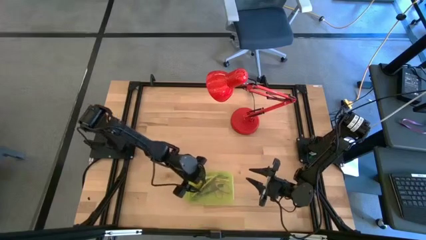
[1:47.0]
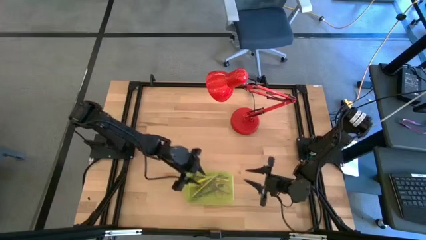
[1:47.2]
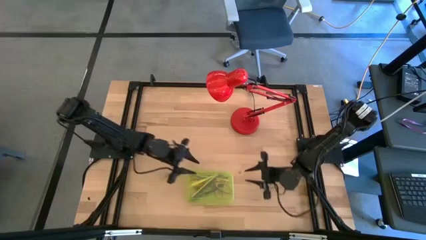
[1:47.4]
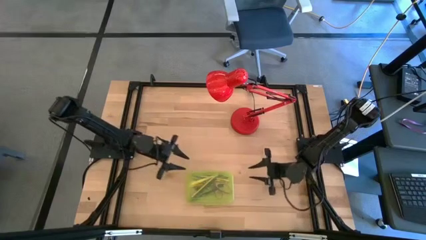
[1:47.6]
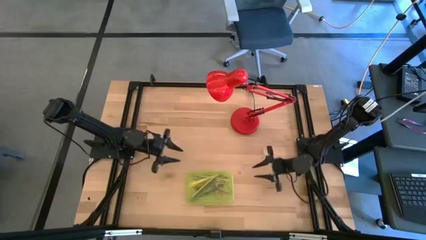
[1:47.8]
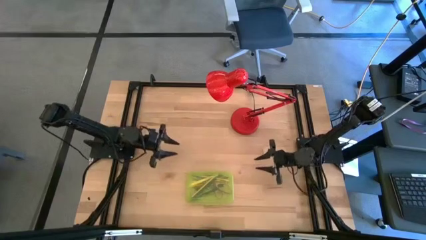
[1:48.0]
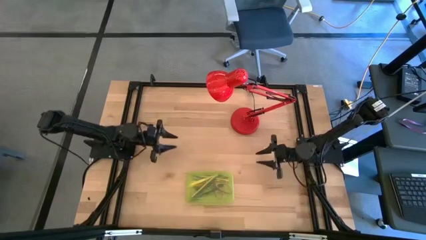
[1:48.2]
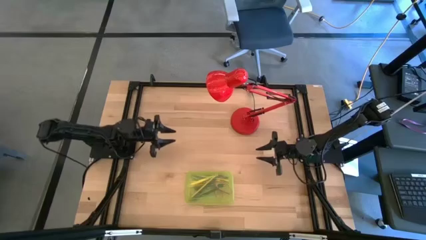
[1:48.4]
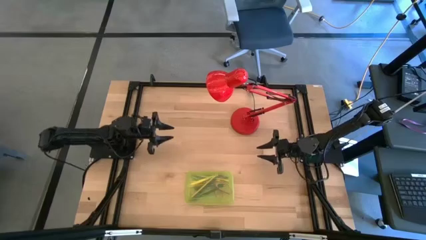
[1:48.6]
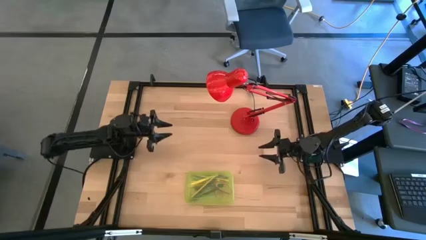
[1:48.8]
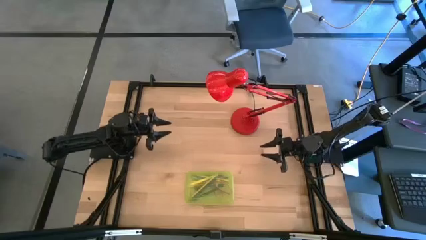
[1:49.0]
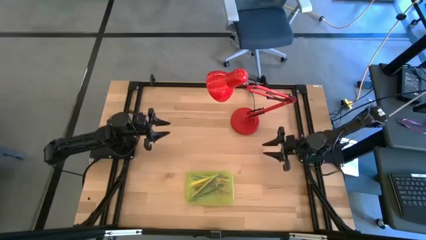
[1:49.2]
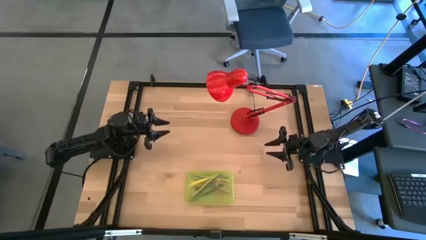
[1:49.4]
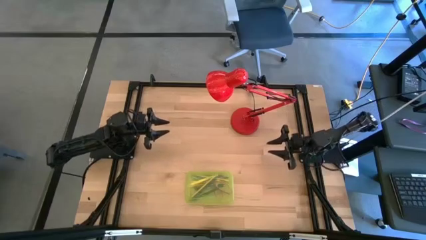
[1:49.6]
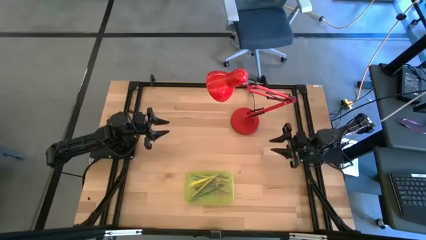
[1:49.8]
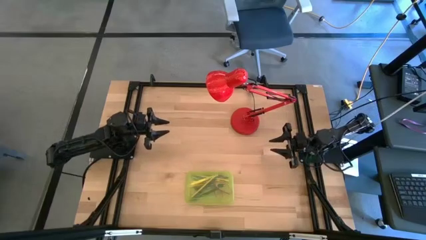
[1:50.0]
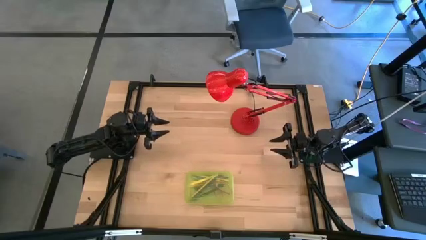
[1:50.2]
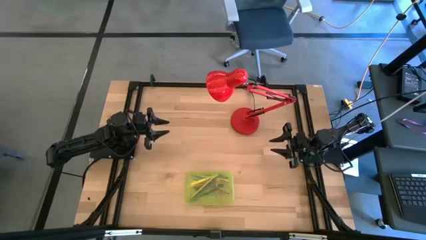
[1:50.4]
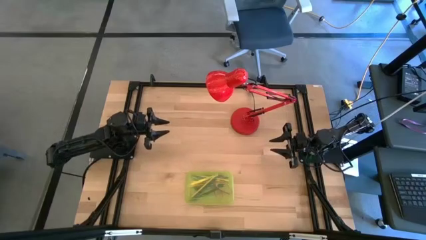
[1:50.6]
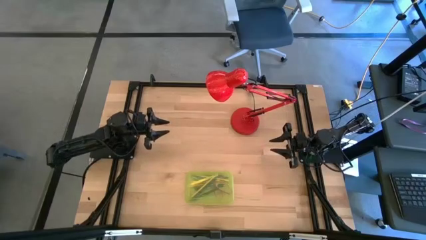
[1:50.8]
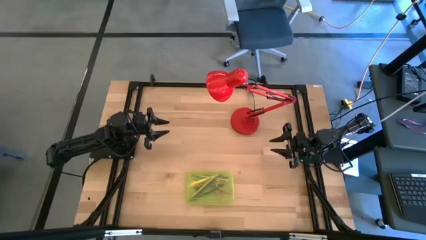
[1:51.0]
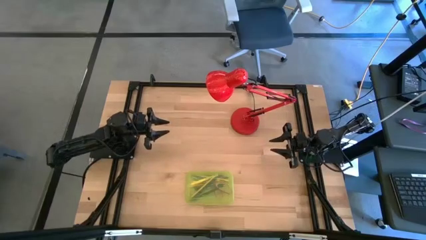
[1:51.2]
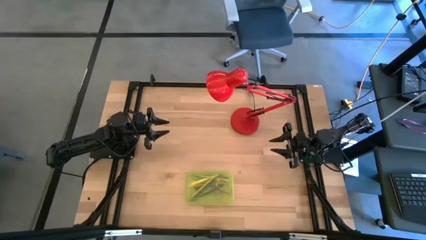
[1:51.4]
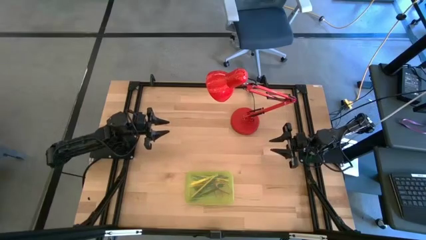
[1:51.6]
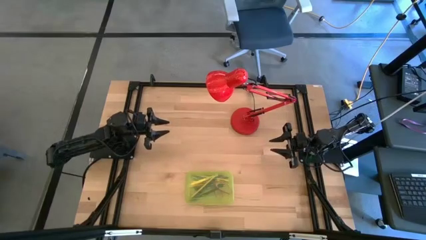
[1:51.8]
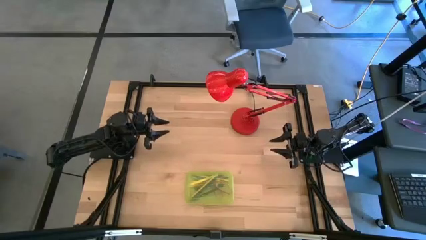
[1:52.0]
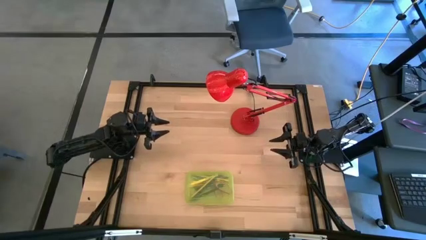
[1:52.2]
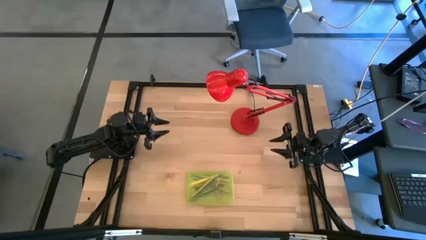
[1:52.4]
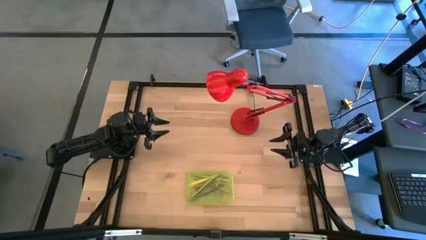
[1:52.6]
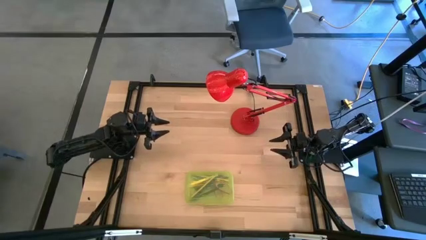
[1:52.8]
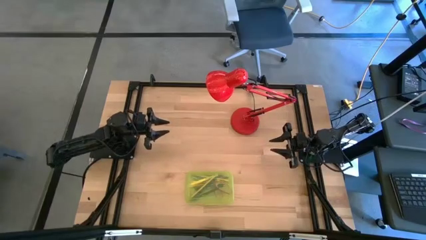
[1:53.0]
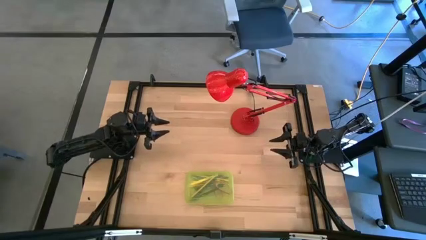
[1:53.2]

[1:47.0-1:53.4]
Task: Pick & place school supplies into a supply box
Return to Home Position

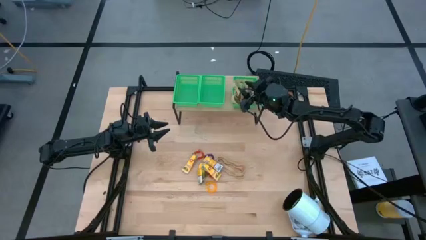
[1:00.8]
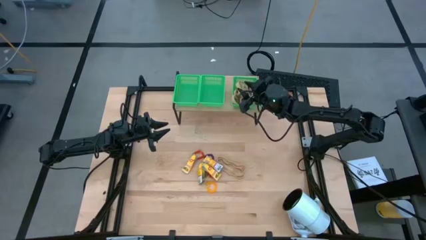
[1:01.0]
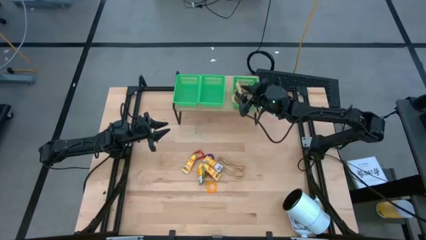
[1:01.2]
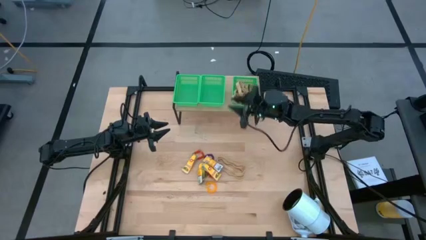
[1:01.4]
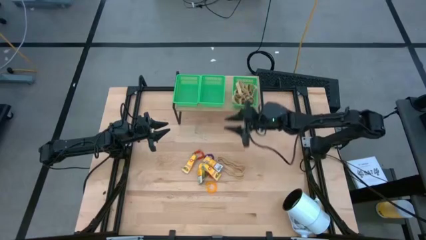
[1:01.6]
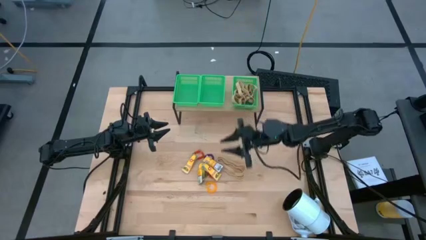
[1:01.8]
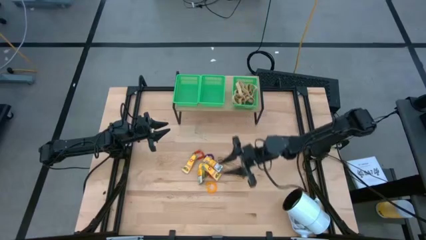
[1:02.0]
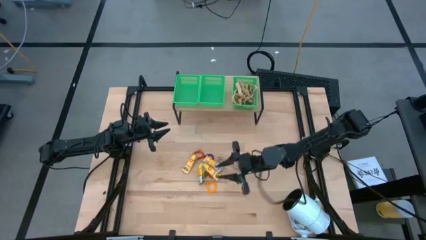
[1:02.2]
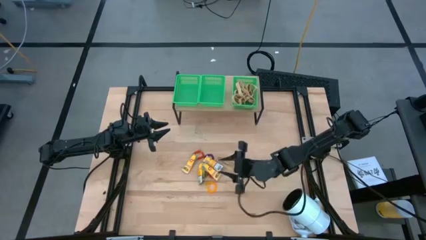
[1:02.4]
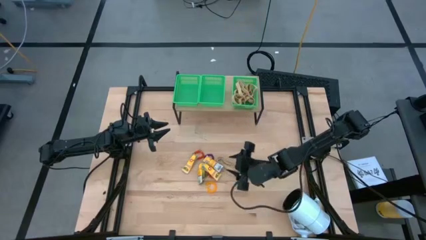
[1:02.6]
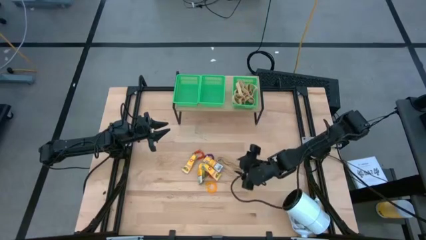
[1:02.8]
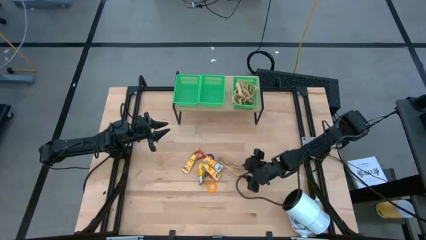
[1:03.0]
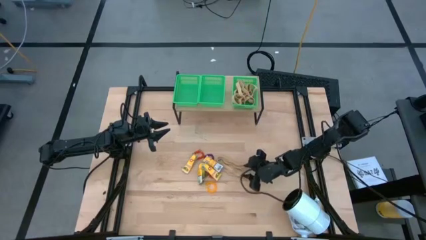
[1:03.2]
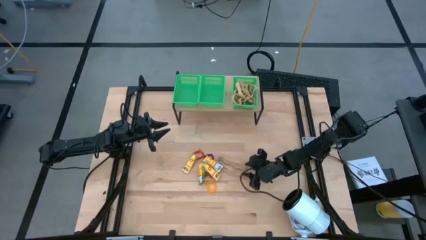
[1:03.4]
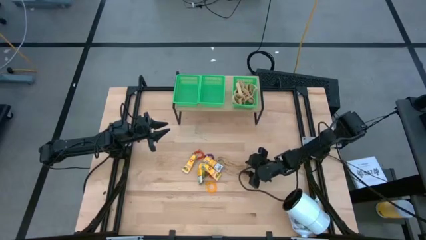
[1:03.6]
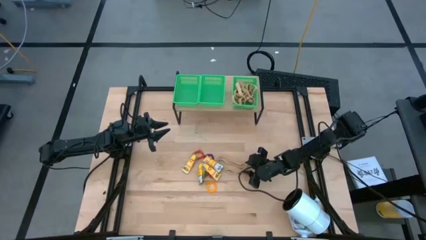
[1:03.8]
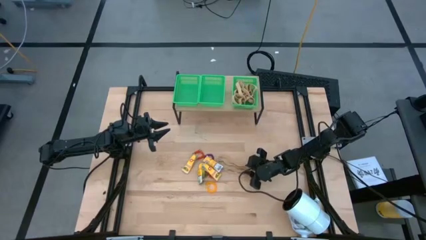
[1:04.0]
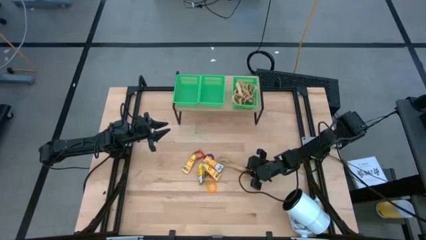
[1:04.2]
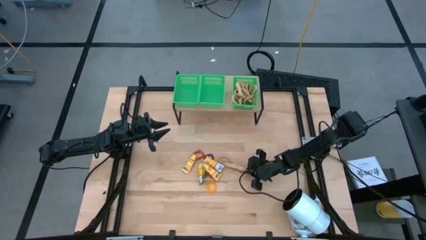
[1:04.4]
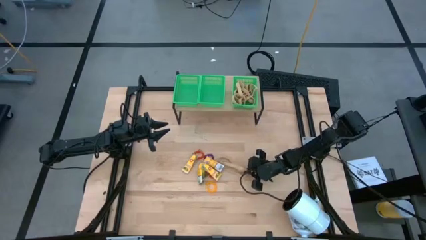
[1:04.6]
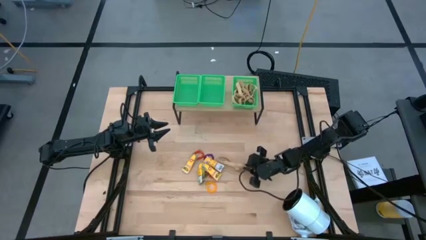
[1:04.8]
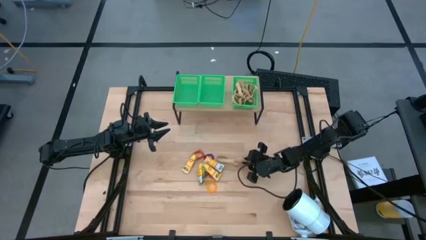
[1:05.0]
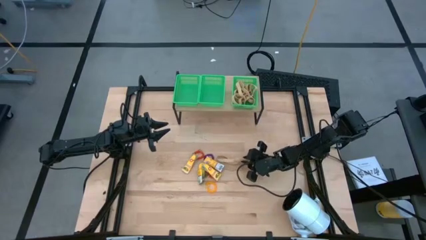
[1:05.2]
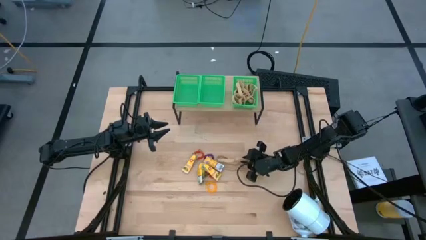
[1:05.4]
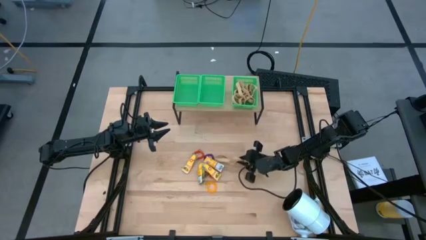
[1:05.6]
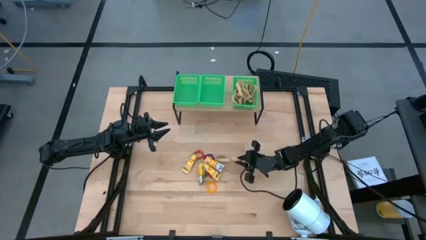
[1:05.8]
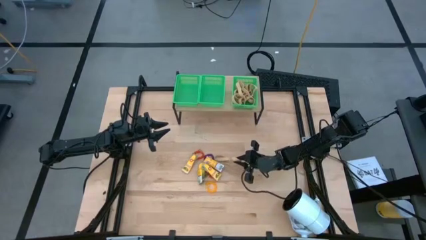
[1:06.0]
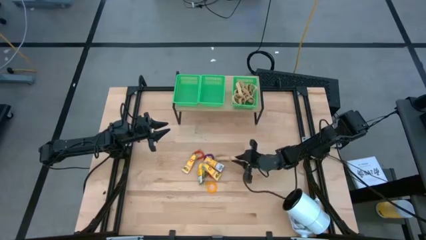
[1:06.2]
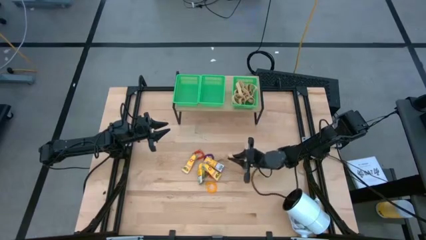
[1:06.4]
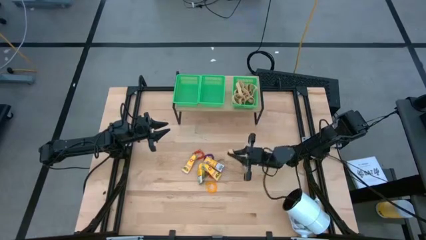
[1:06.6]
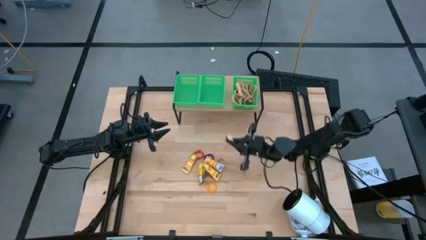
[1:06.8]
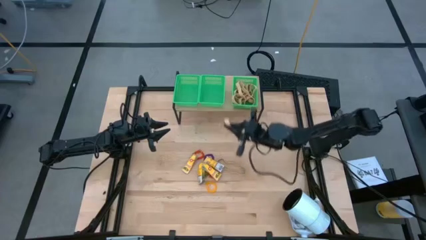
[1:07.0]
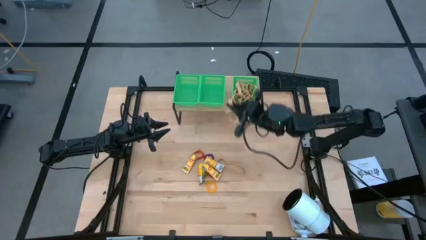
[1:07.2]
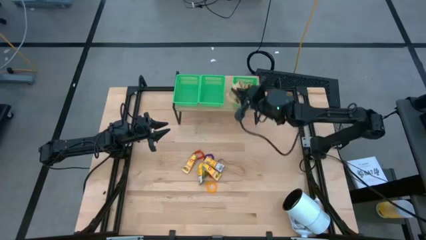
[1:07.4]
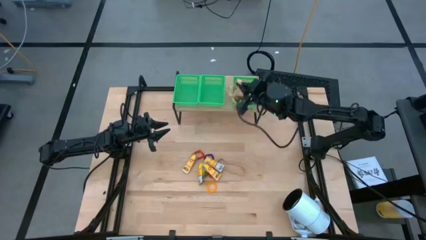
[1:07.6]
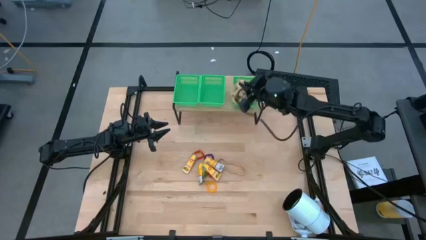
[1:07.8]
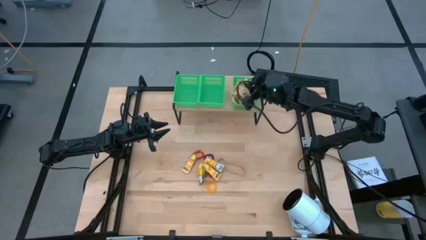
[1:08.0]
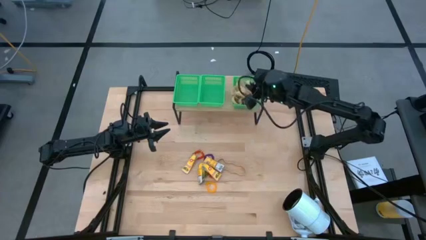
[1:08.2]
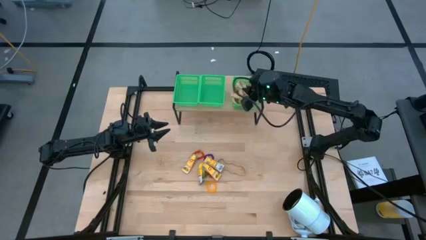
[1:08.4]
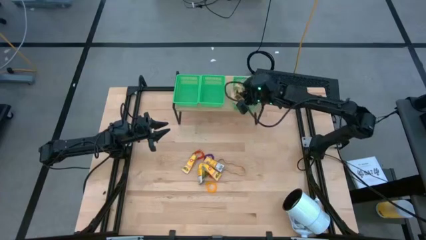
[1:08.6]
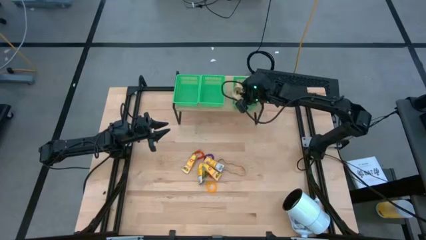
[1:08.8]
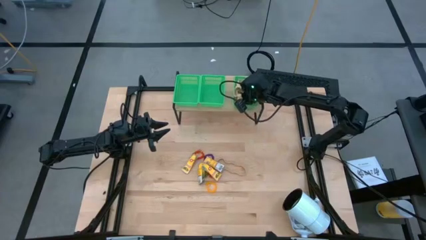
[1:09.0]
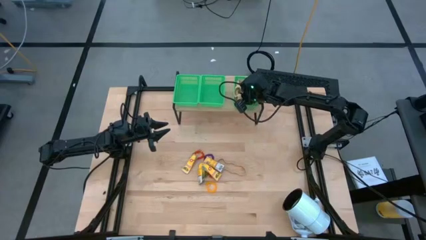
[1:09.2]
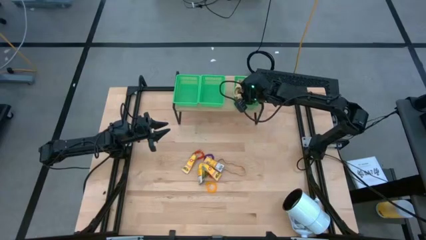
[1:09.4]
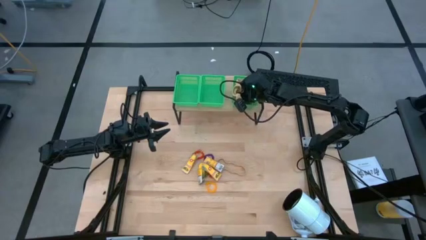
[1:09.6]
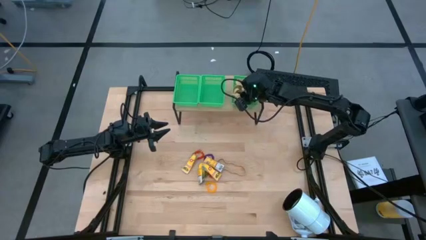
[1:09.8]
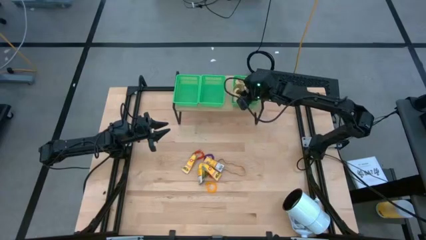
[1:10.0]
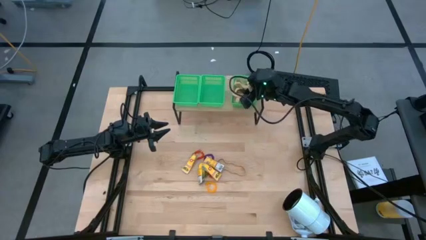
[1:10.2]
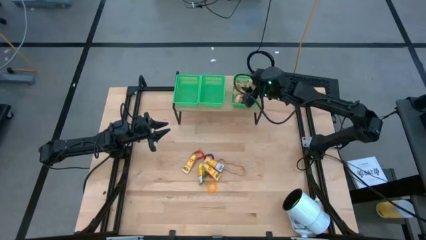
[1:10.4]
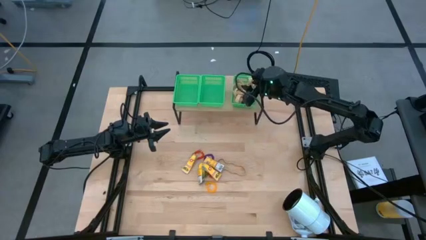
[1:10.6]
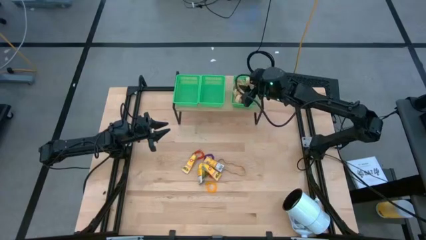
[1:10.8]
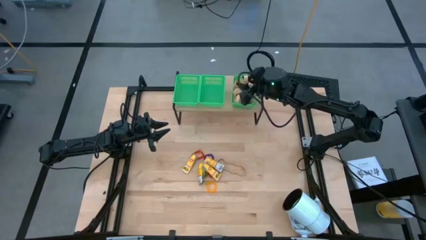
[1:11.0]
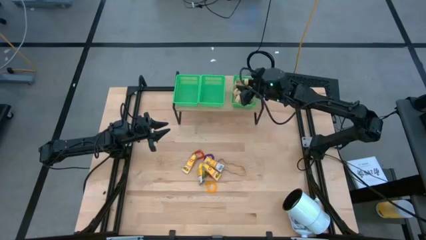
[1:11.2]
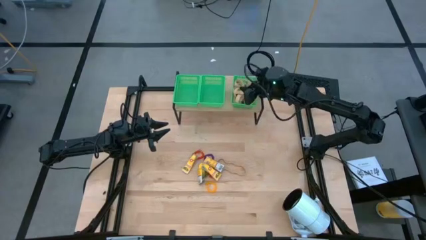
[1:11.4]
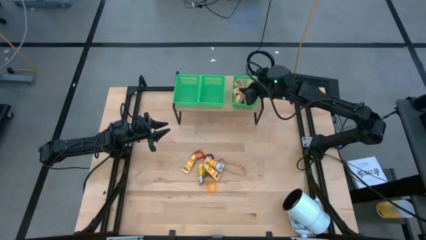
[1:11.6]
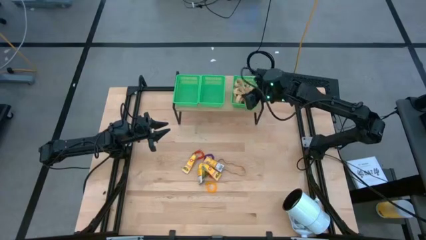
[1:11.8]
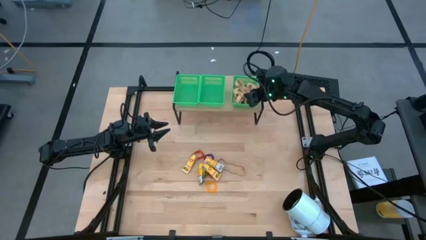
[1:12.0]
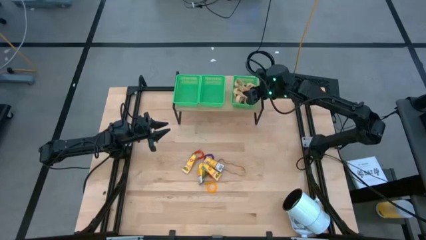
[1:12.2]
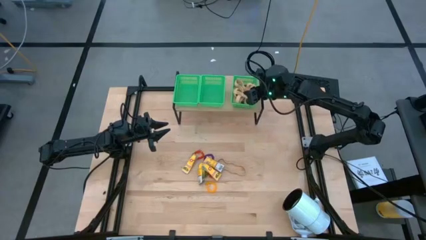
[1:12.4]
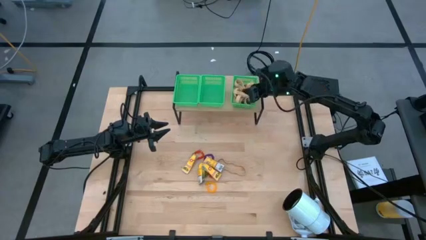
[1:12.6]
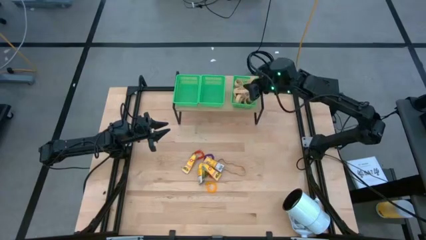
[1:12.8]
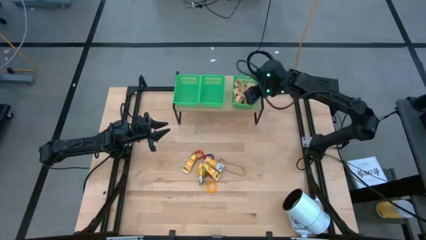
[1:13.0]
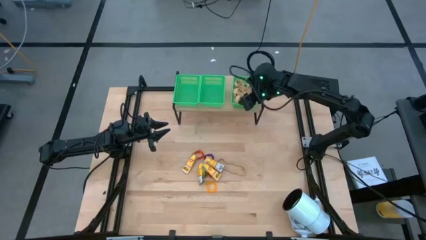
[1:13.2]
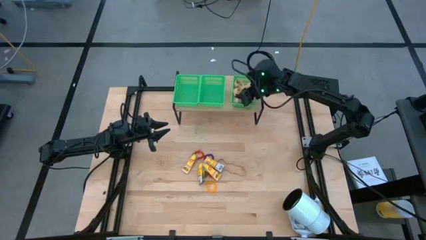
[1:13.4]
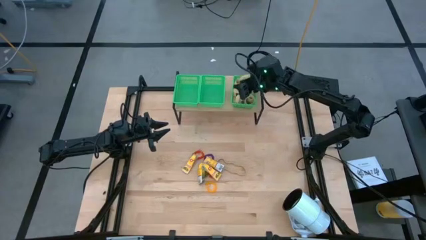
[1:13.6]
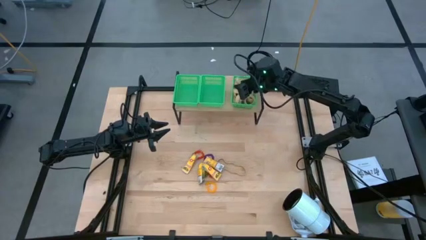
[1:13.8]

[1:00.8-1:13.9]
Task: Pick & Place Office Desk Supplies
Put the brown rubber band into the right green bin on the shelf
